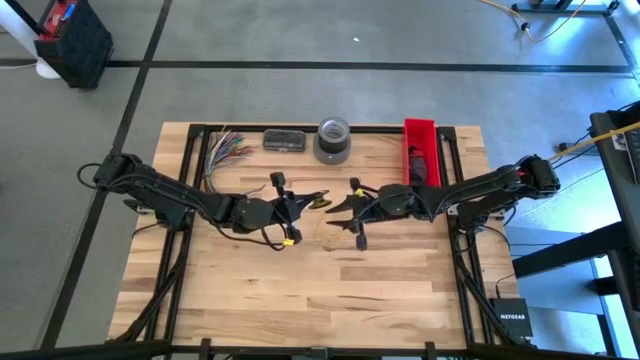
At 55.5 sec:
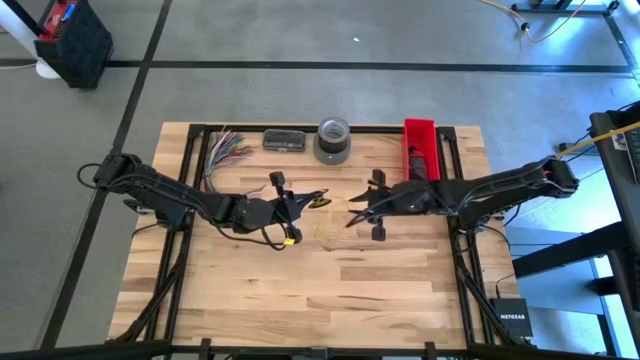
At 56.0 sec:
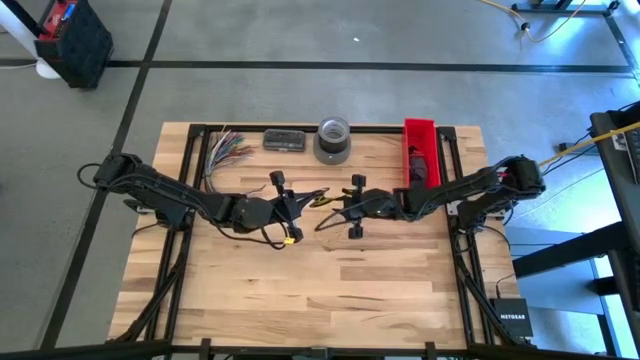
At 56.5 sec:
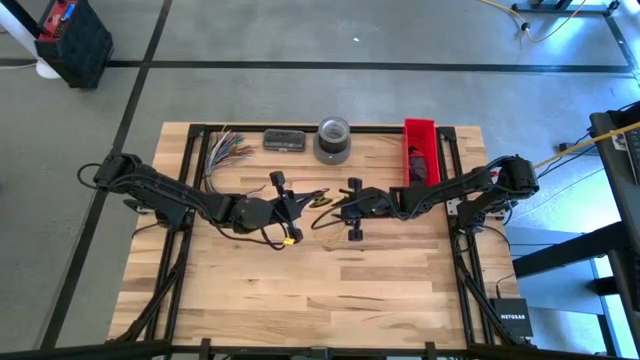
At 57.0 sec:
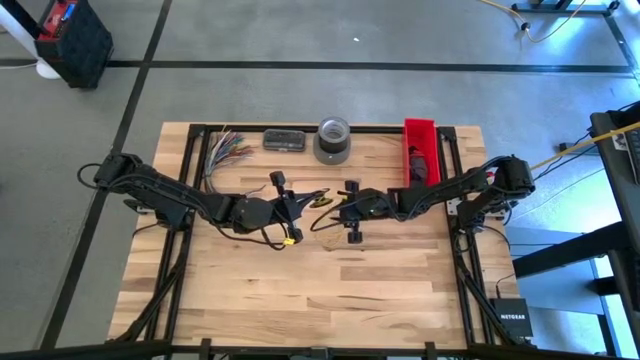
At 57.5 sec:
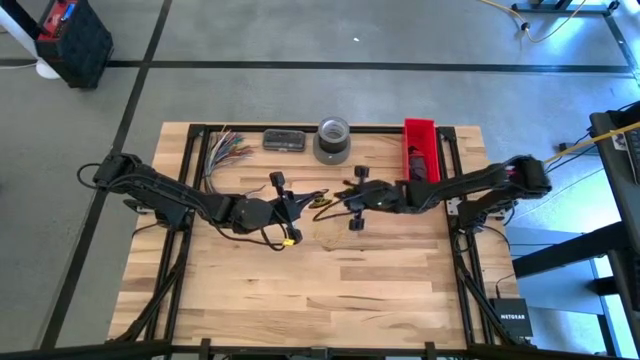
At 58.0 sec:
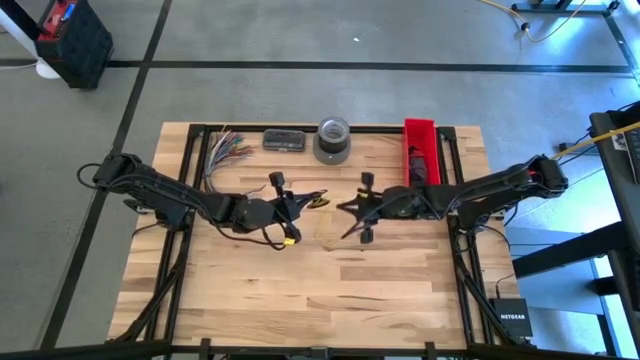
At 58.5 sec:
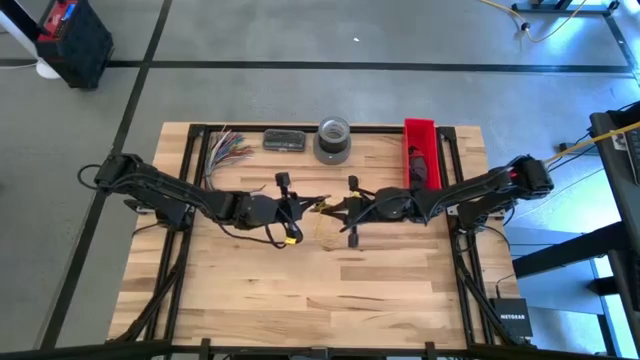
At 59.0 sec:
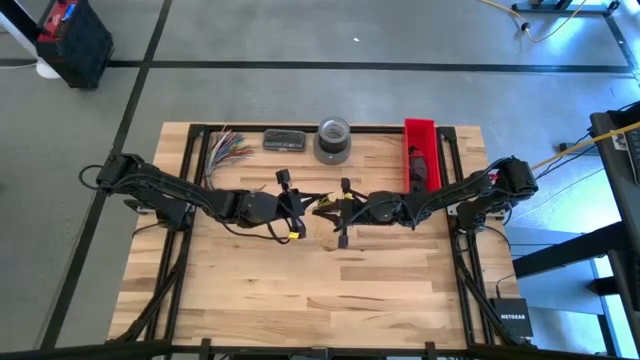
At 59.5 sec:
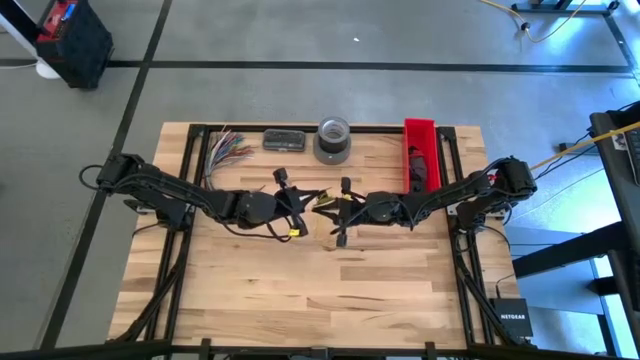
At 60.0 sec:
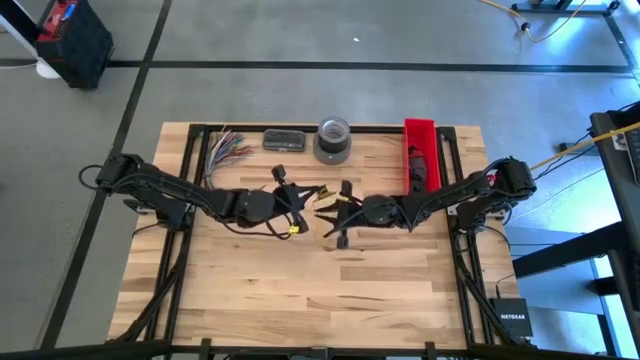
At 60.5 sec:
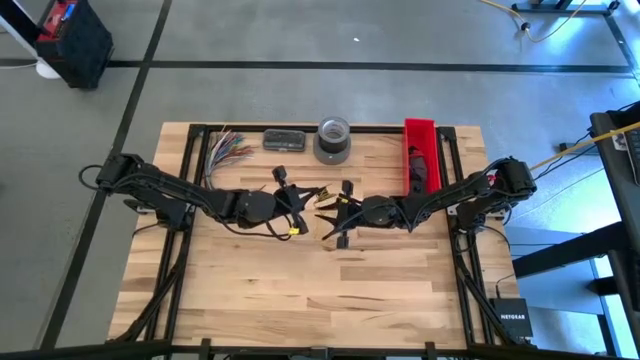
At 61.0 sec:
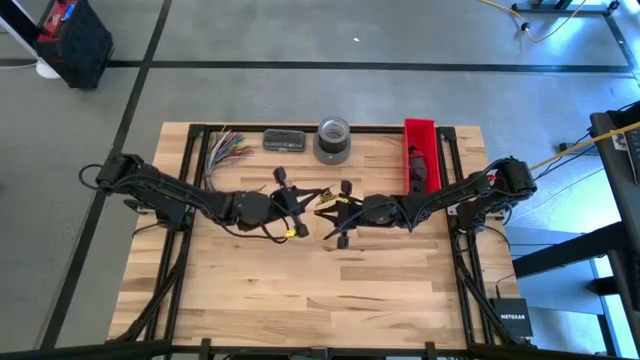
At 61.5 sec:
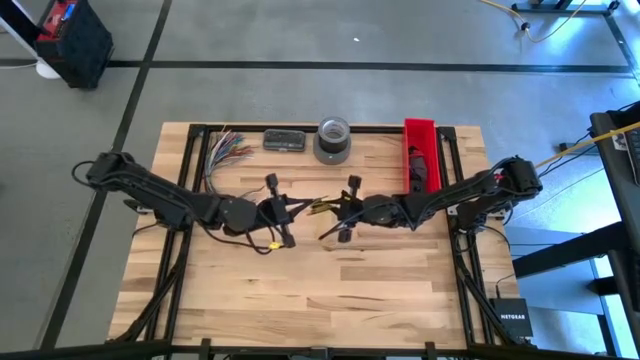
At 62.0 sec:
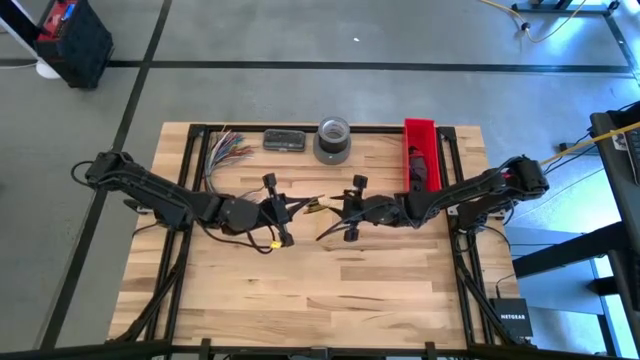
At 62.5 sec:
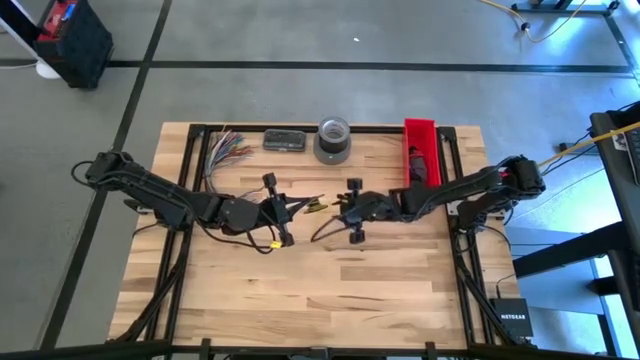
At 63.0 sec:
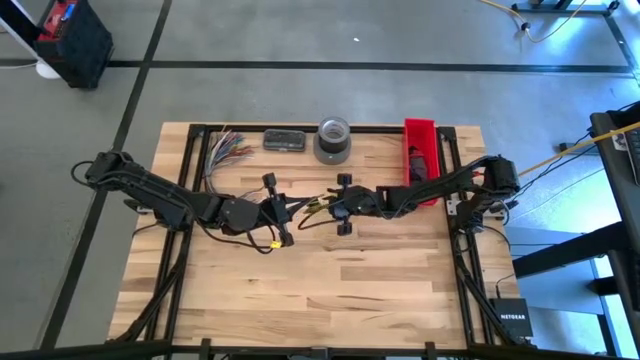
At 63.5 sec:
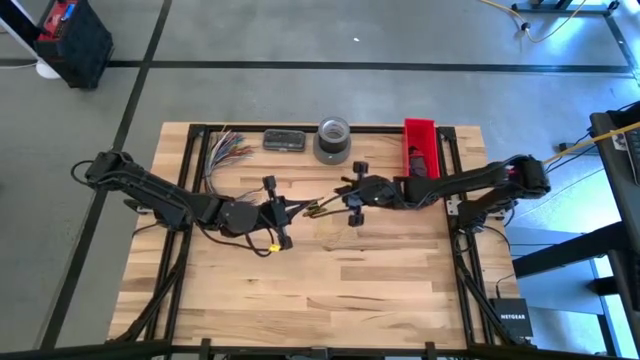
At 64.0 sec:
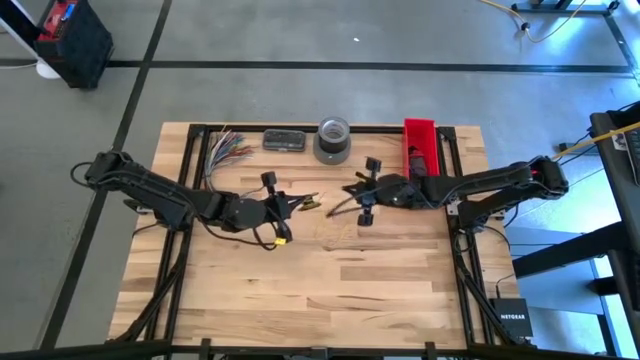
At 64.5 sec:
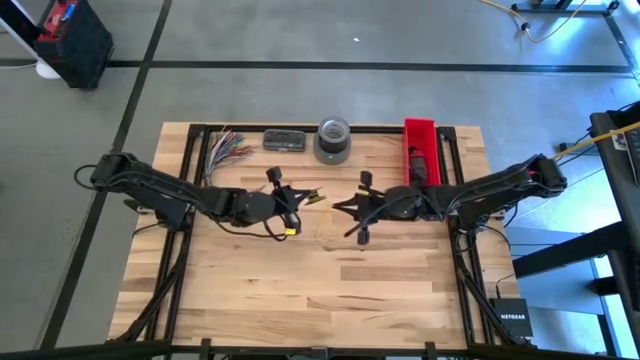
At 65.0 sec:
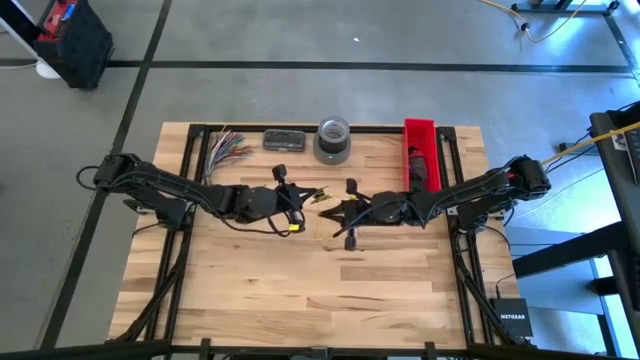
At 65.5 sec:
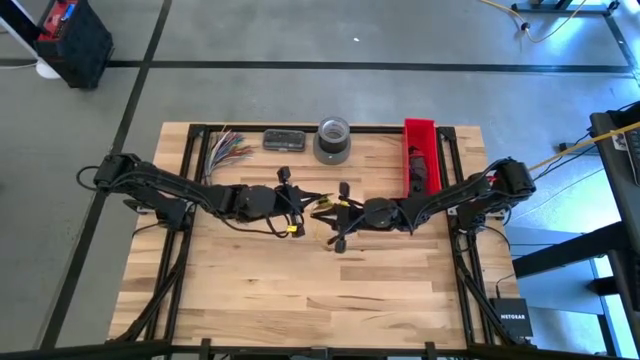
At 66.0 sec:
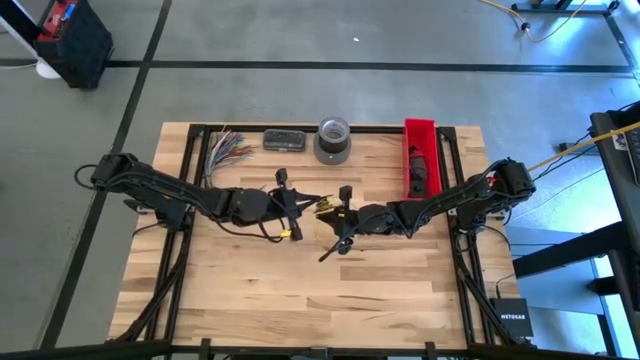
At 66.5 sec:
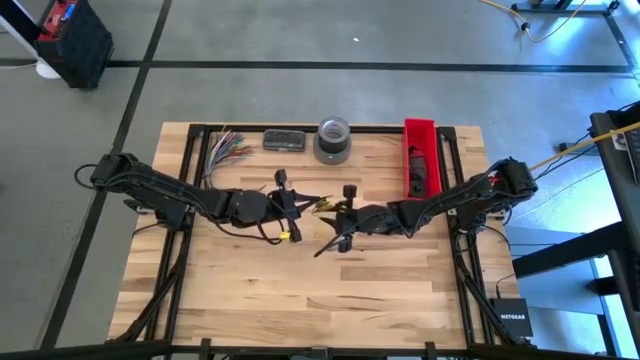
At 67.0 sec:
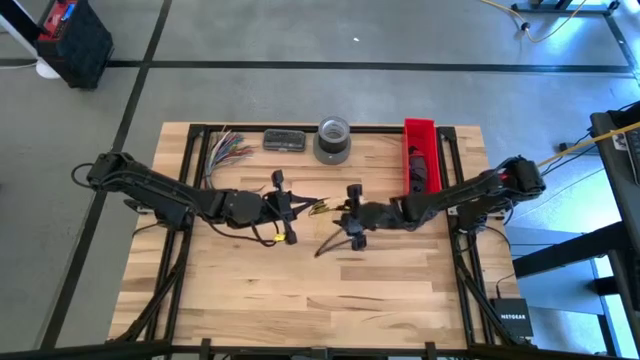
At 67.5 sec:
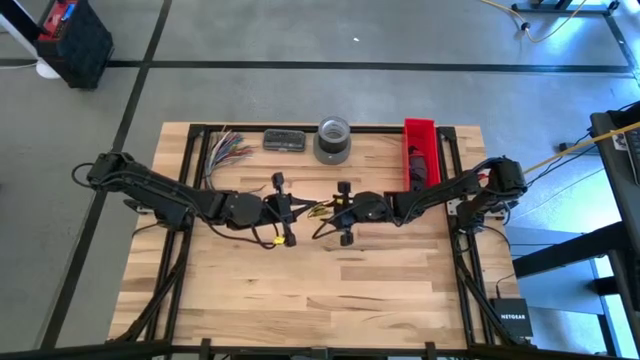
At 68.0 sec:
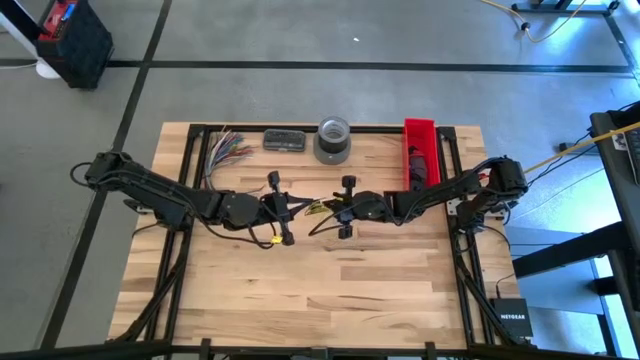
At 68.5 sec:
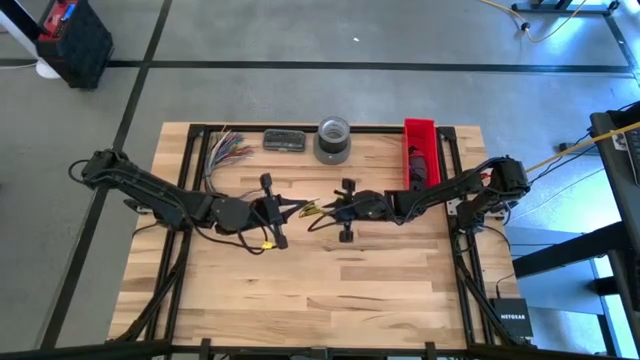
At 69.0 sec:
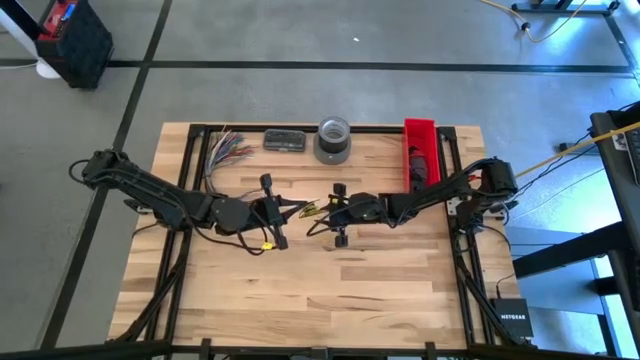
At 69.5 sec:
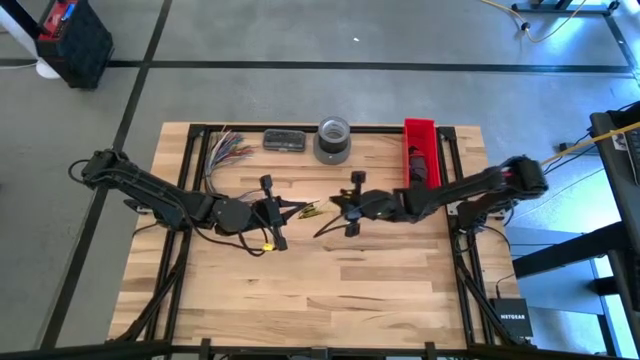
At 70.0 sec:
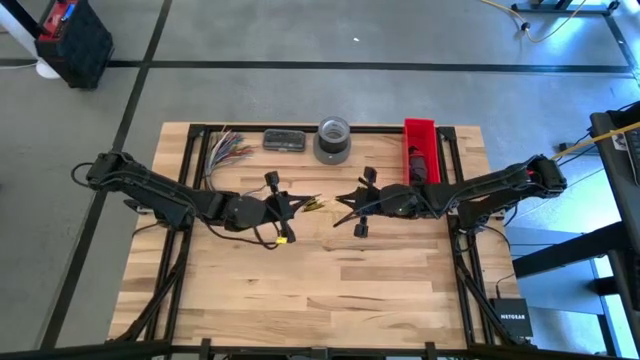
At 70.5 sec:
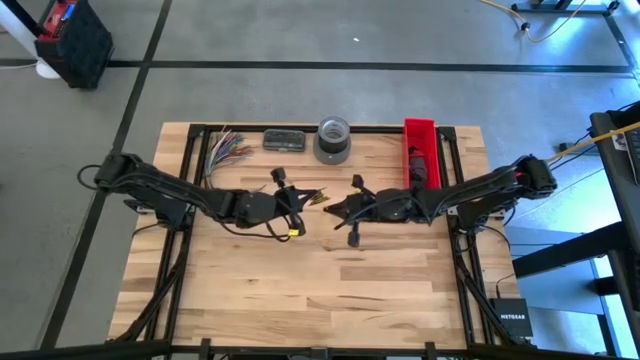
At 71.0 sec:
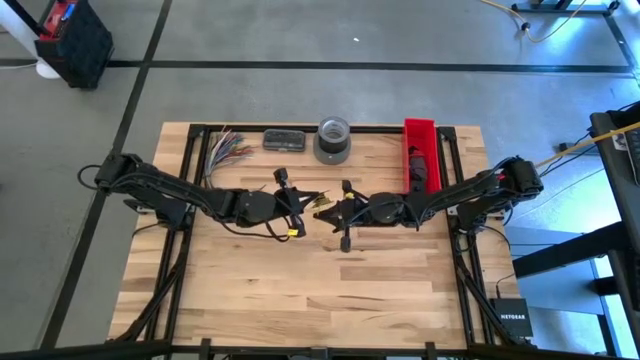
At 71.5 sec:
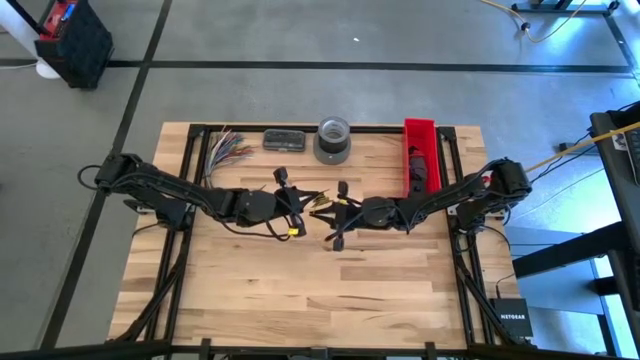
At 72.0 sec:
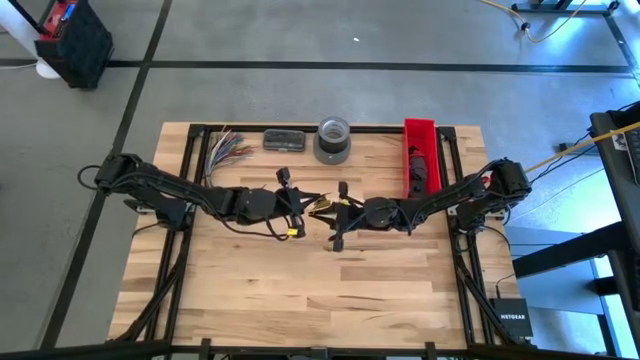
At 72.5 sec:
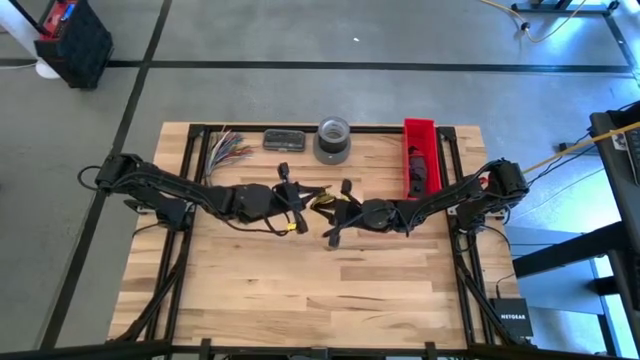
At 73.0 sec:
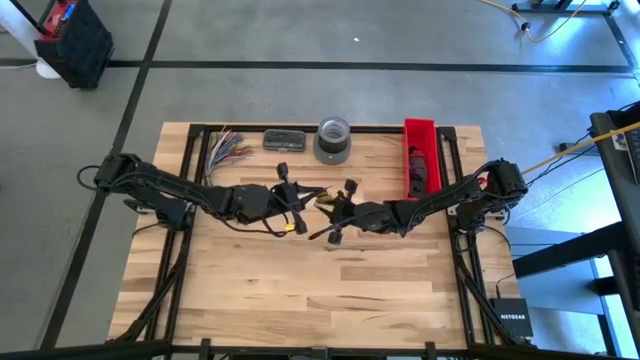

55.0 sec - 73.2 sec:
Task: Coil cords
Coil the yellow wire into the black spool

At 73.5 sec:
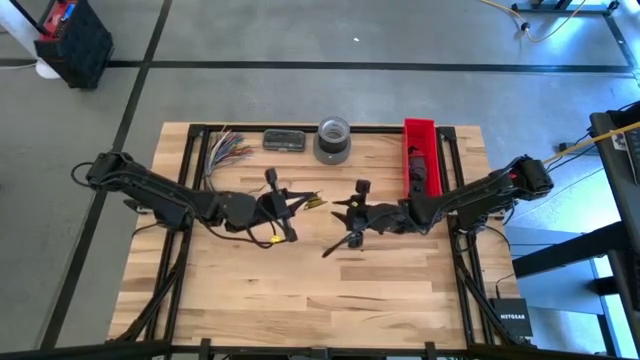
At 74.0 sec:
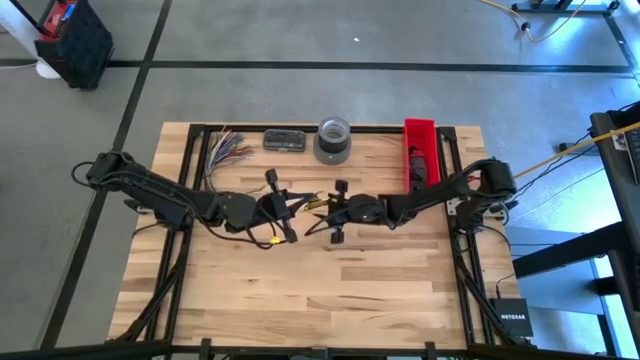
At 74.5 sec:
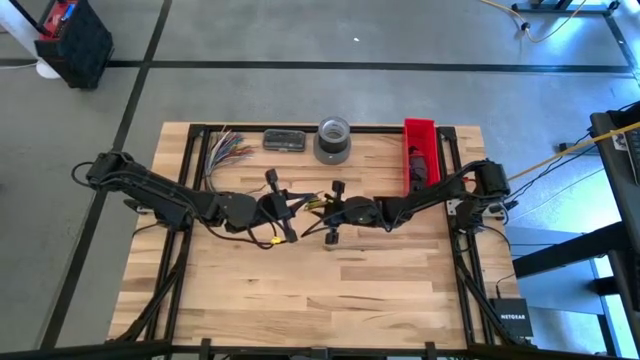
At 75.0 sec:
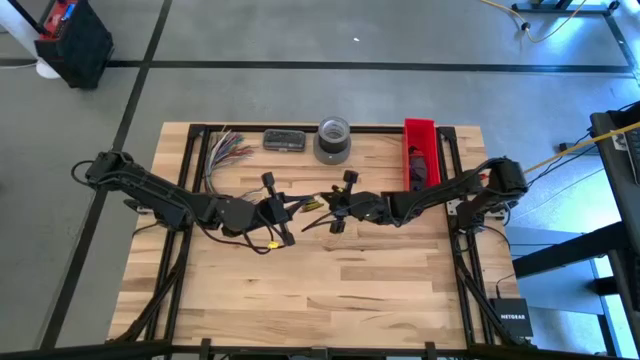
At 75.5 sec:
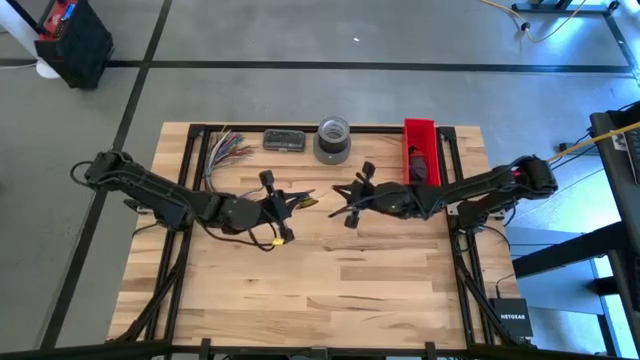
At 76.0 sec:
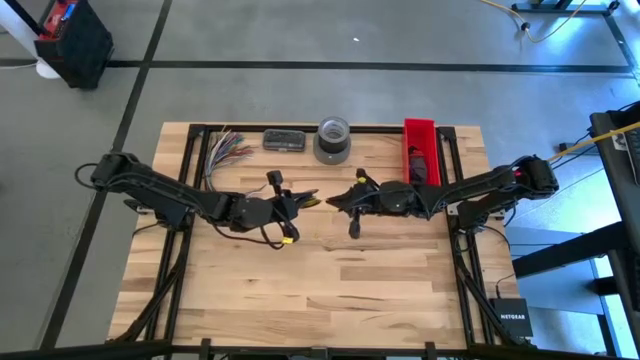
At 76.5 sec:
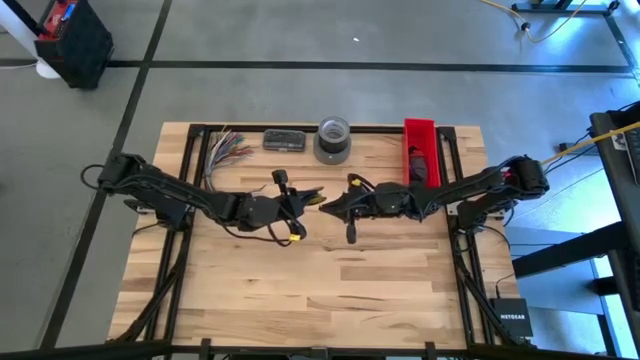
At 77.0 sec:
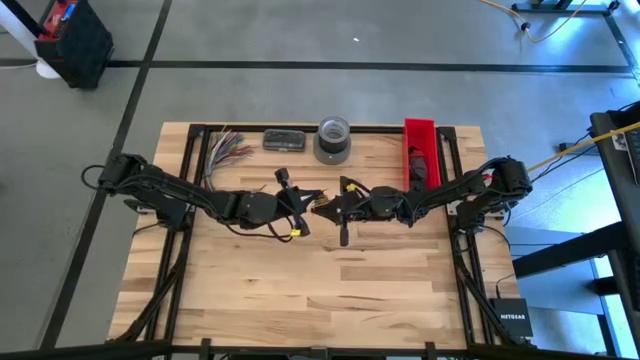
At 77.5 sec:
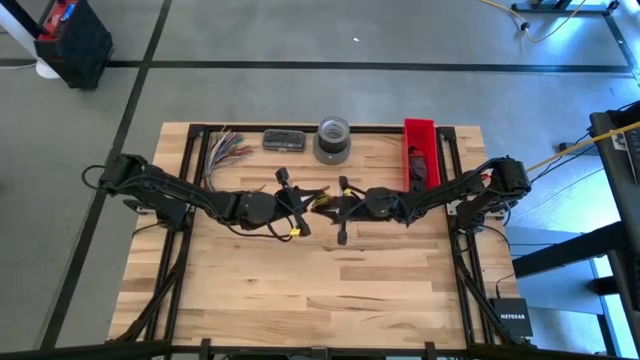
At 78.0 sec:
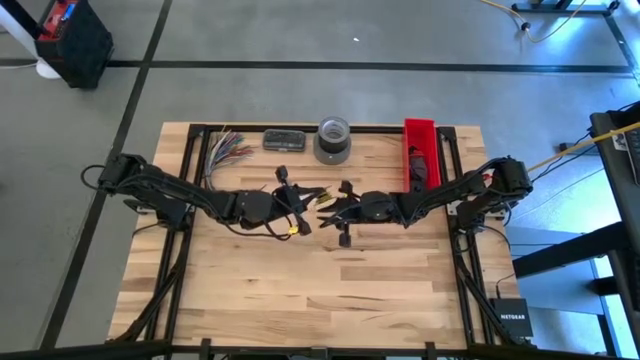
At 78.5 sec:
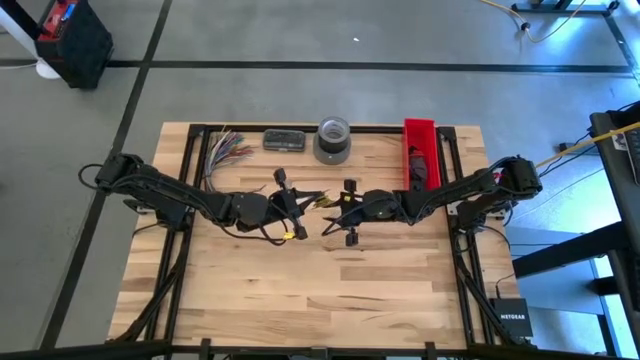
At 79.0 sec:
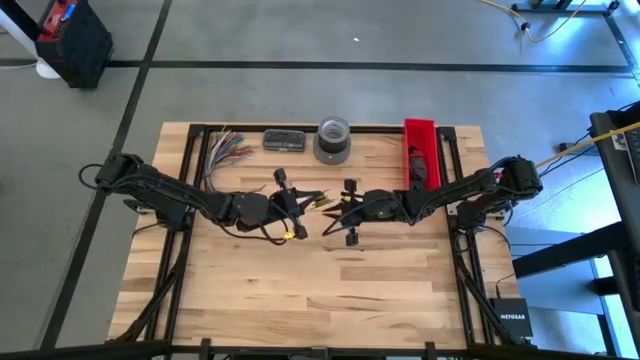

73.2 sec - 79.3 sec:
Coil the yellow wire into the black spool
